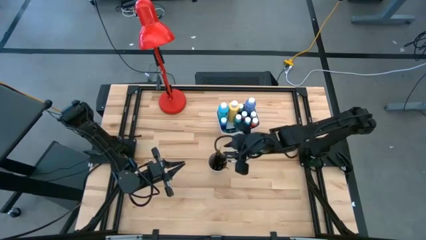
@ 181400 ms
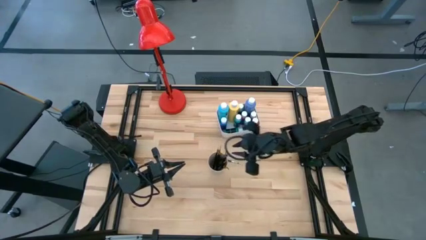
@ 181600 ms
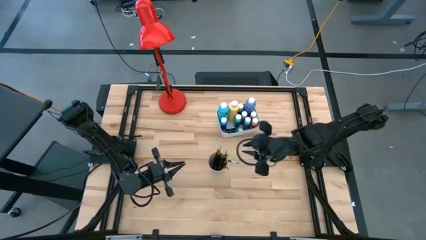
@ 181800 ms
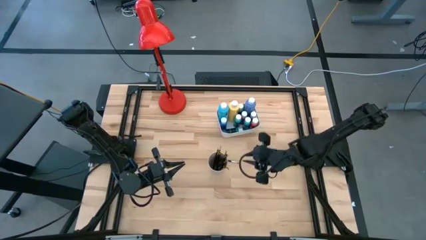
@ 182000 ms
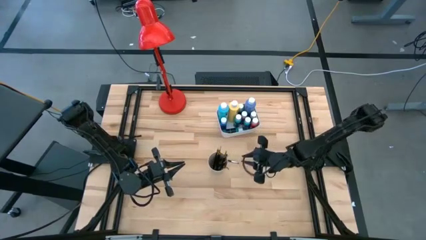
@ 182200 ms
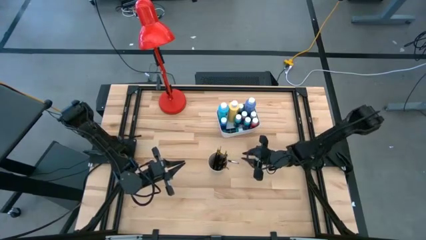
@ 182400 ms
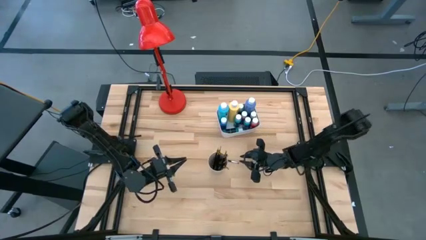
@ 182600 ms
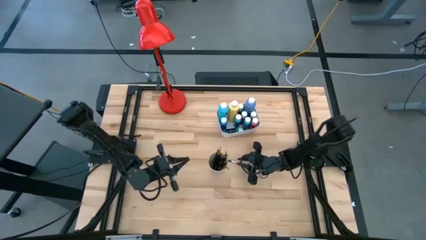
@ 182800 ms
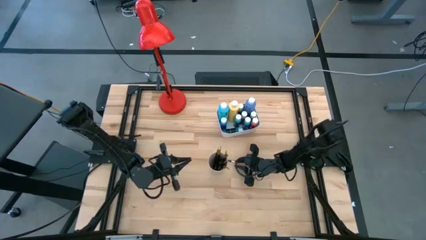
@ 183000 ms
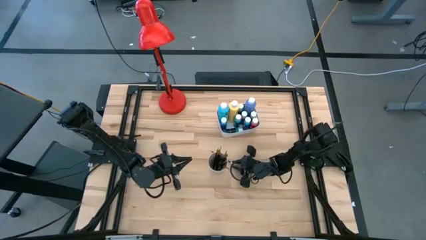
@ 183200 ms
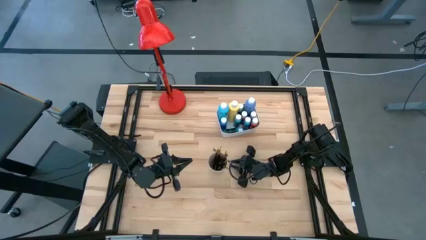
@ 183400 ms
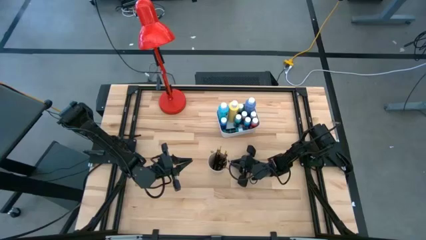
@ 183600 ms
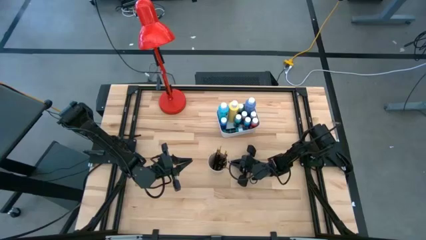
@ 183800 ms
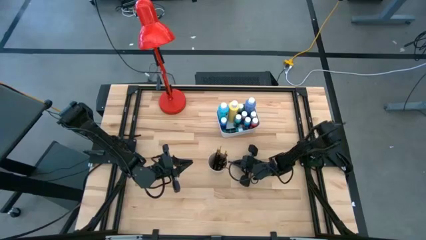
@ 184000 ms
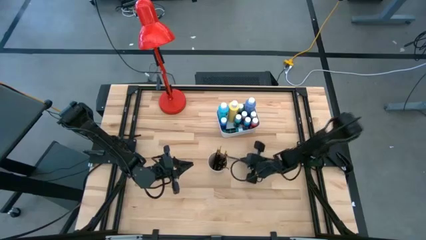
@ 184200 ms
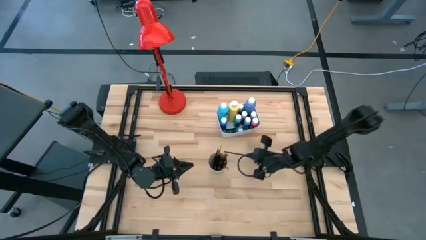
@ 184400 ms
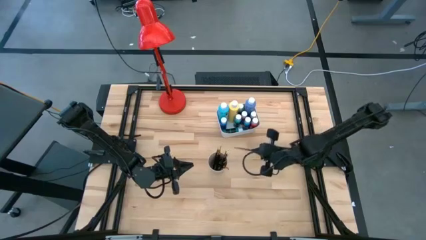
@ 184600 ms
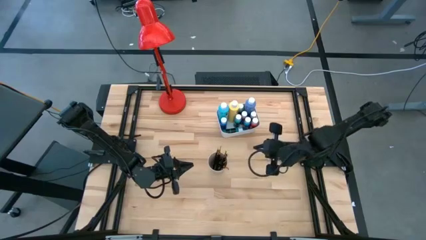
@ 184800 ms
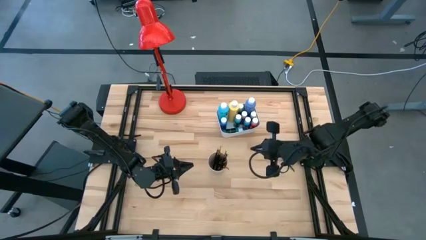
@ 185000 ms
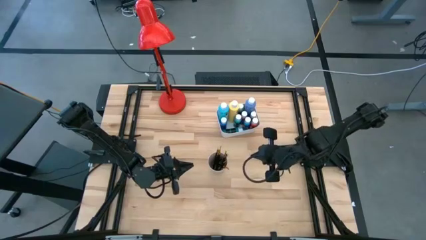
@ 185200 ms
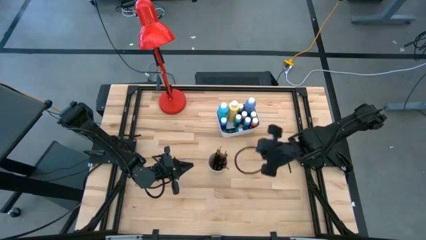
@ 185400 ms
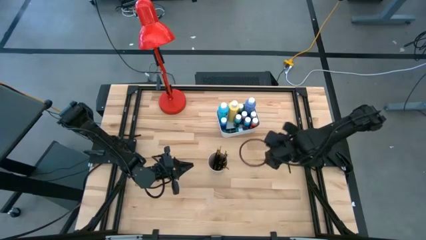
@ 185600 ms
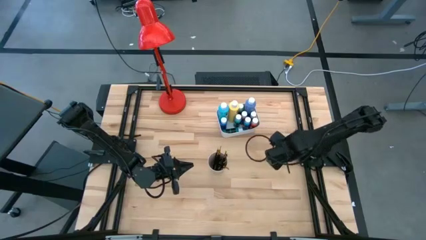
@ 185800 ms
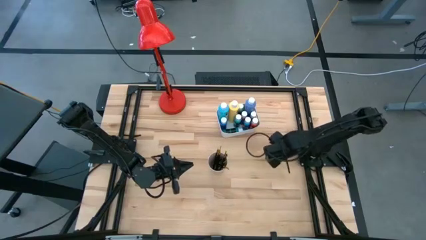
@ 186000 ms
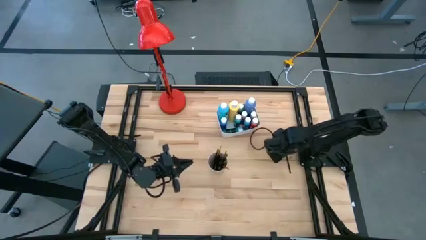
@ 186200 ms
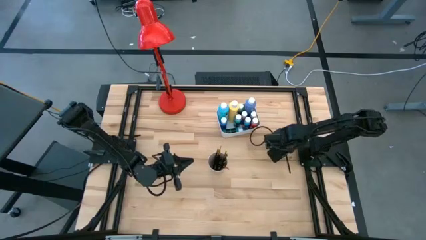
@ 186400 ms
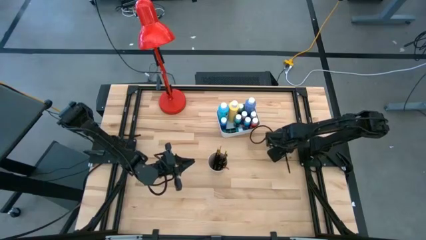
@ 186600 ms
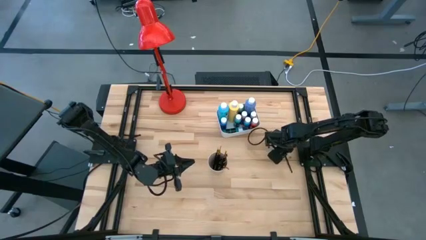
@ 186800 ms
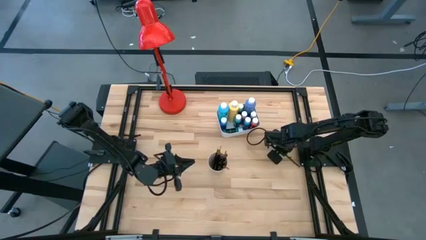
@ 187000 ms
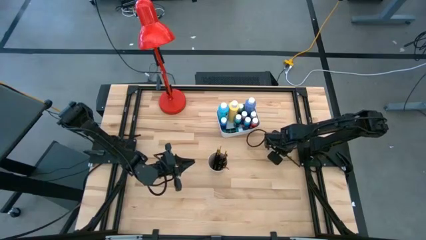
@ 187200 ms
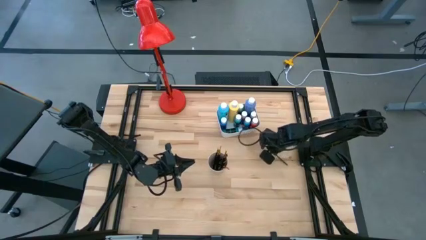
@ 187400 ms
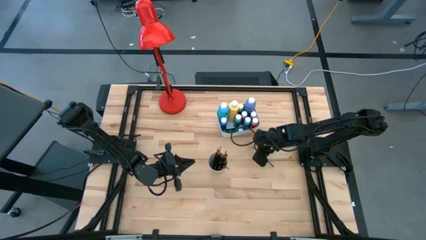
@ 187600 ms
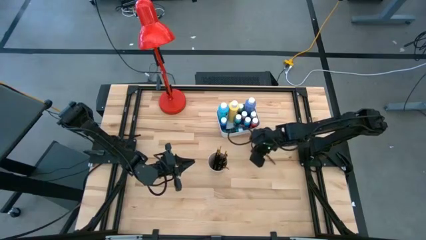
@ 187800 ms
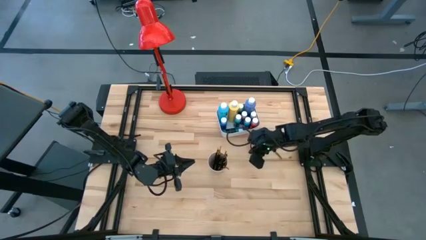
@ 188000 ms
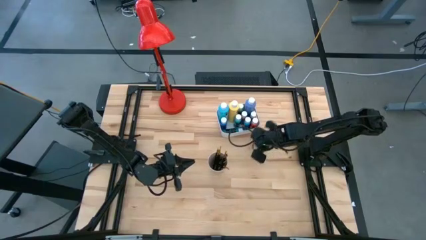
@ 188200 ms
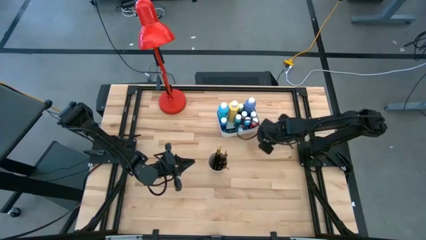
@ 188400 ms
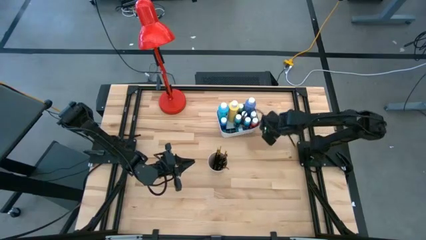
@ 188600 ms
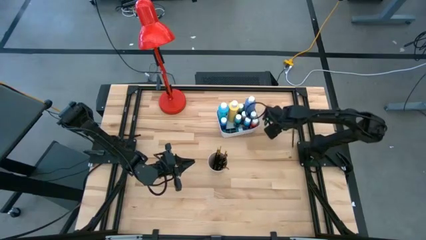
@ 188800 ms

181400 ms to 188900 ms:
Task: Pick & Place Paint Supplies
Put the silver paint brush into the white cup

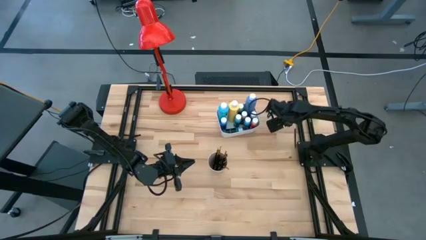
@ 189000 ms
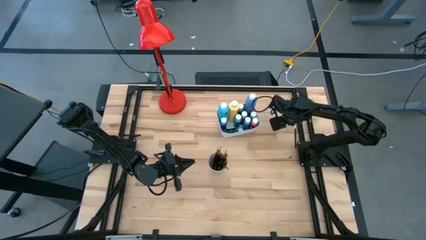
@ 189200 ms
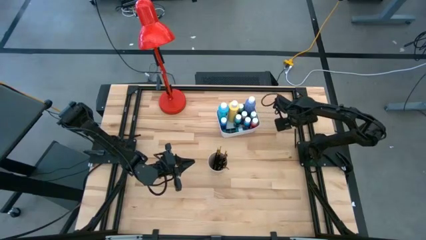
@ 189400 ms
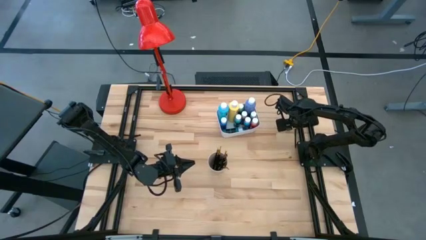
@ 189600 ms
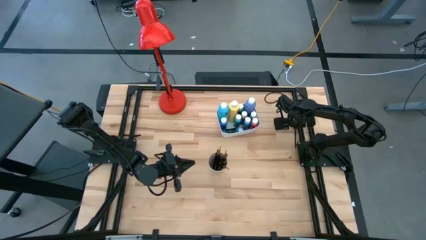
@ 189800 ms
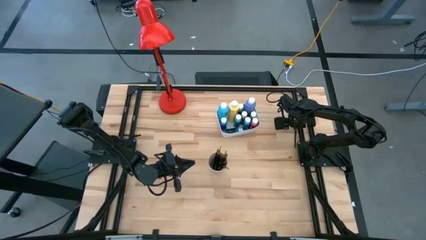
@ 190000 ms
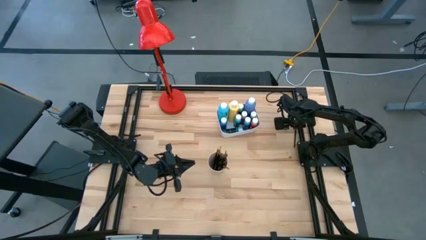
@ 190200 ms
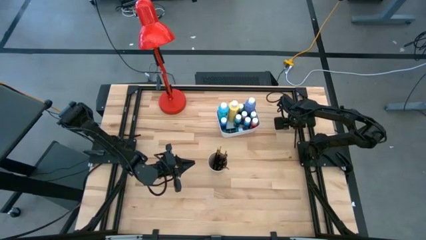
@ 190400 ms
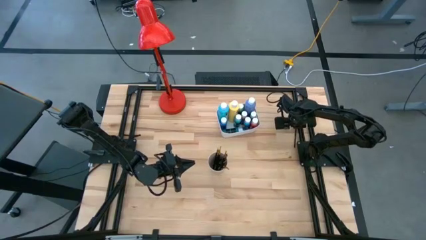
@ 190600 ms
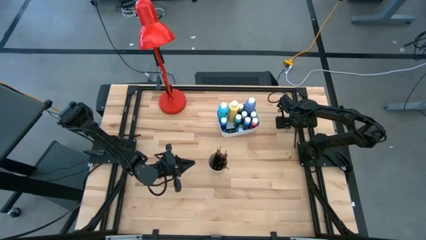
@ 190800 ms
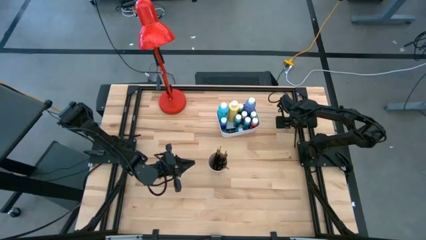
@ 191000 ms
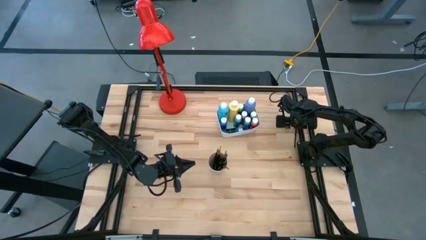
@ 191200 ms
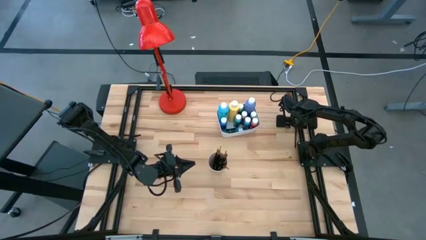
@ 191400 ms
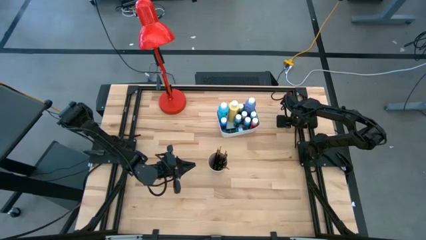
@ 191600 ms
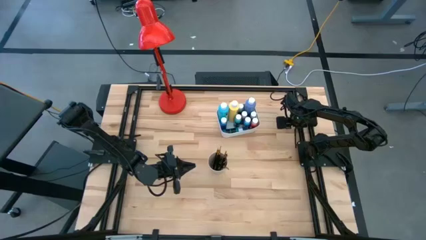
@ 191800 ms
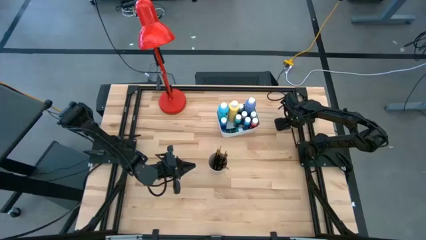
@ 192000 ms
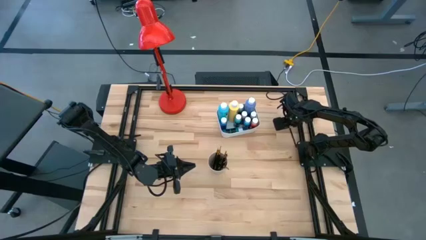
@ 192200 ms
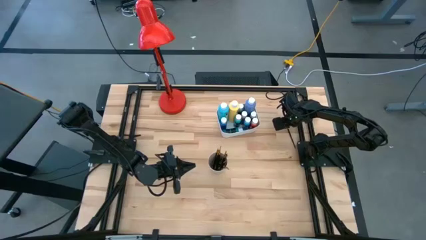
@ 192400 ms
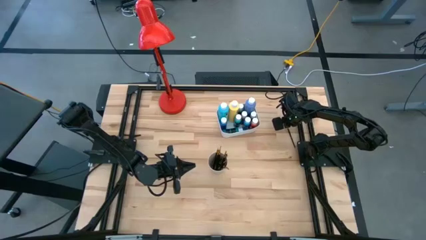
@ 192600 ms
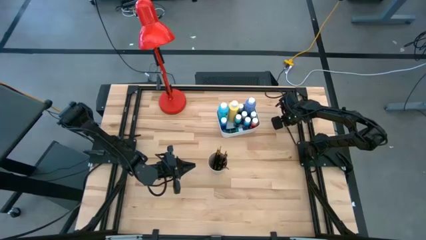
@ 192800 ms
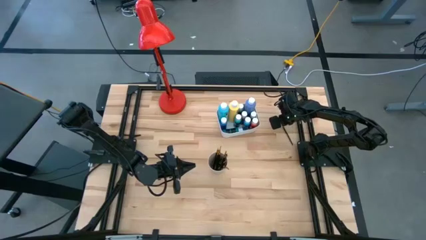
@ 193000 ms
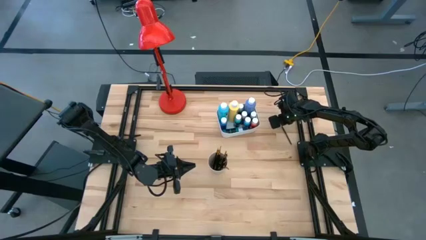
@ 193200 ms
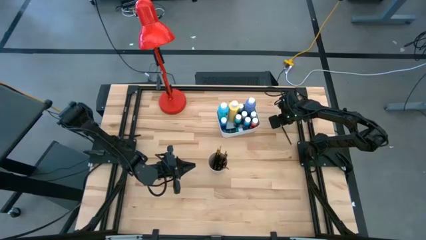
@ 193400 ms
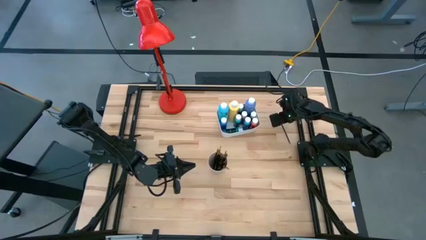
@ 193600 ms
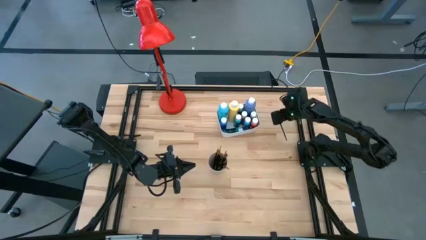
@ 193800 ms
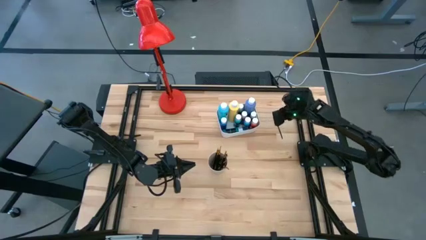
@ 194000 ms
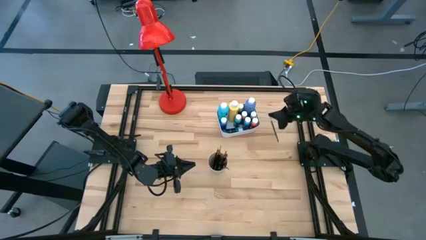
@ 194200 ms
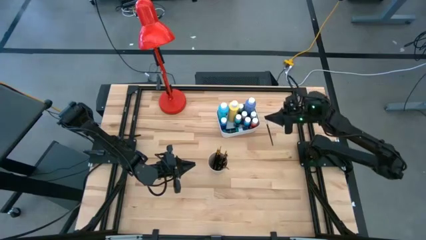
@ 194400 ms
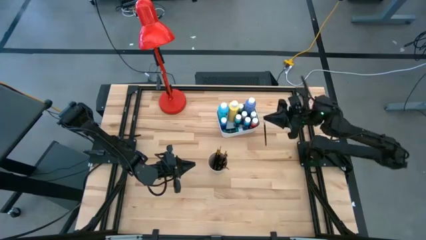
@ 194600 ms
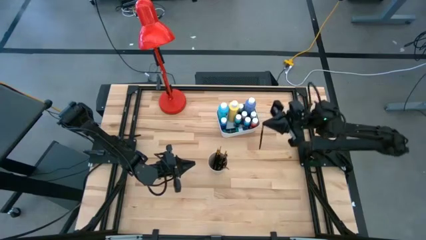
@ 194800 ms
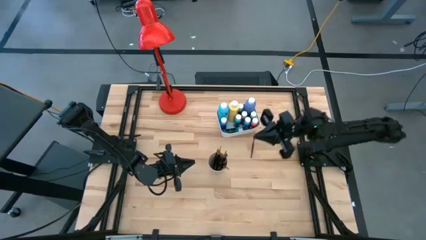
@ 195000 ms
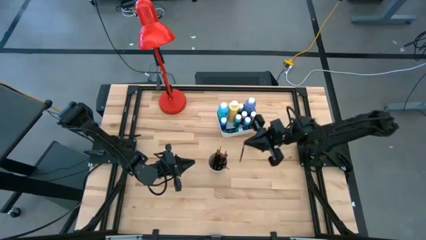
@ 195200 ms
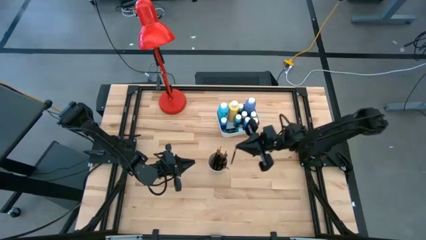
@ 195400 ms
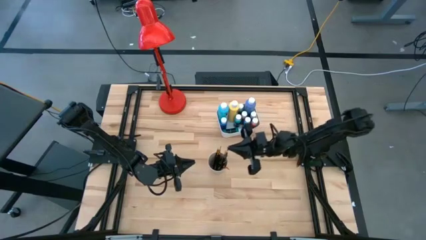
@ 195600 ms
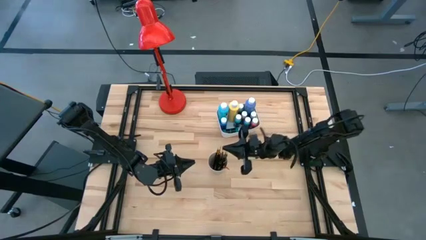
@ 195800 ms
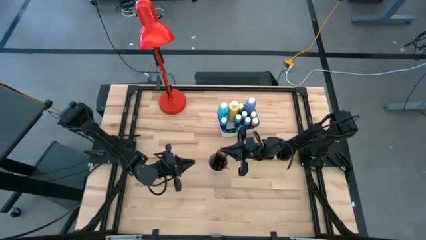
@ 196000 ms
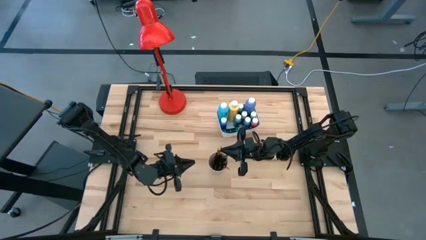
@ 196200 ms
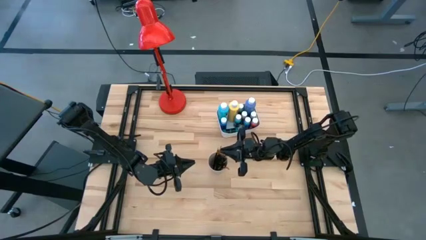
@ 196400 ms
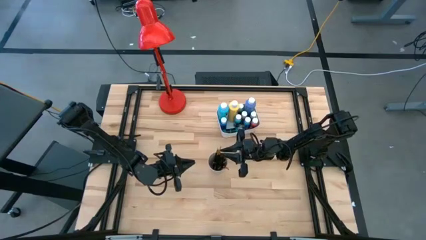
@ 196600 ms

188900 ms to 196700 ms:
Put the silver paint brush into the white cup

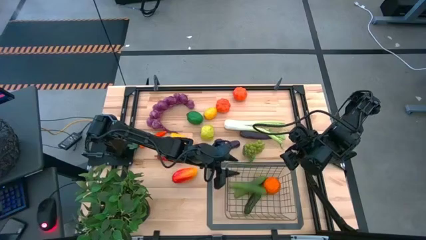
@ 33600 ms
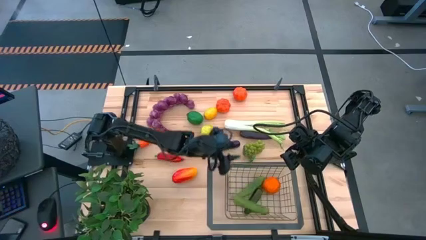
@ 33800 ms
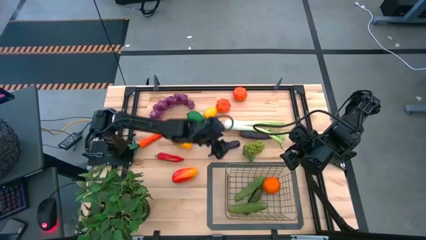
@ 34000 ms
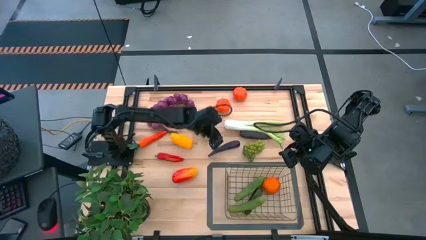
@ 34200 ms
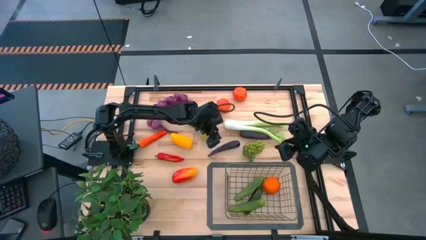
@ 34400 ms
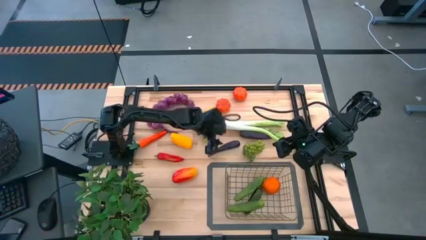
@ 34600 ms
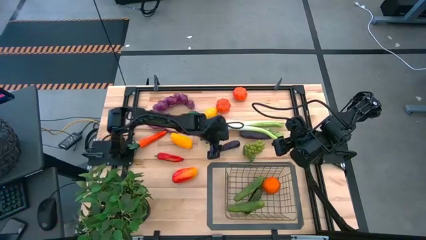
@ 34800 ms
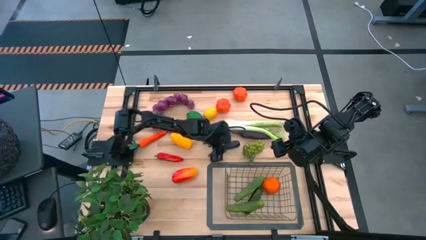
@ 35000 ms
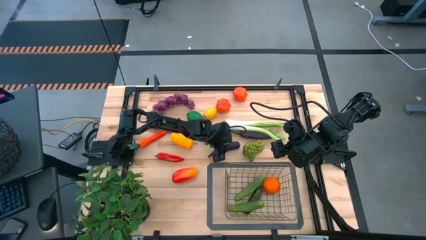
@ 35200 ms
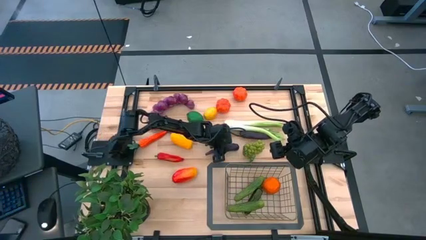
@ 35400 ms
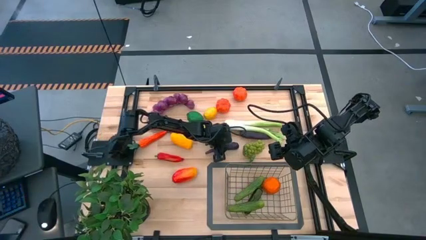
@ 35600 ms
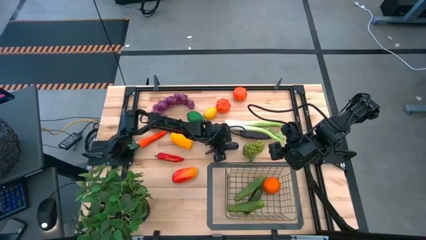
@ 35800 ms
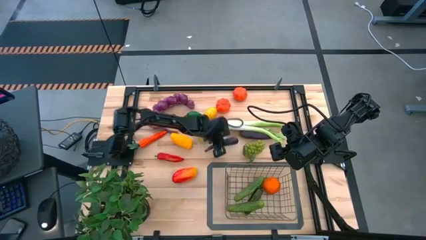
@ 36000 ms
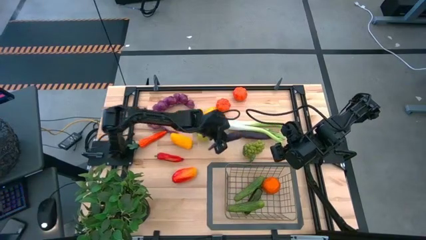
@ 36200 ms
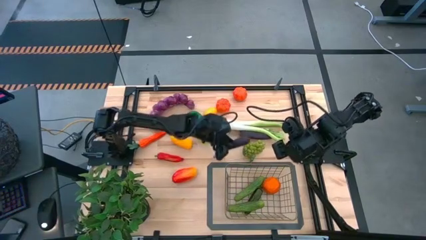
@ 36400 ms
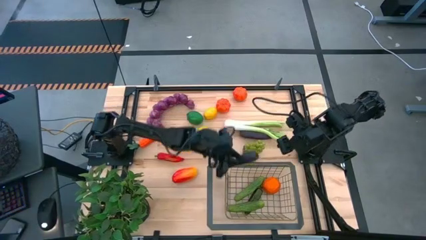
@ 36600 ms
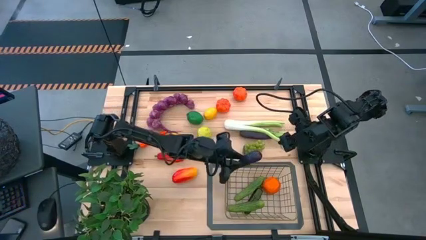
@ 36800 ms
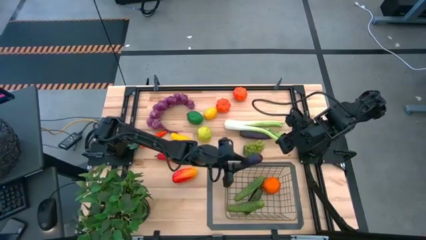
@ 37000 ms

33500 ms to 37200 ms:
Task: Build produce basket
Put the left eggplant into the wire basket
